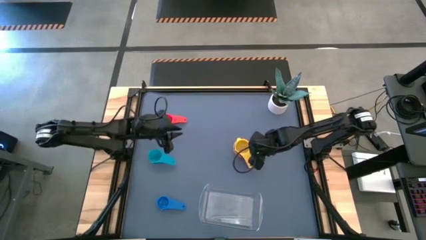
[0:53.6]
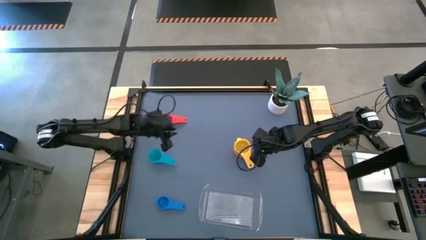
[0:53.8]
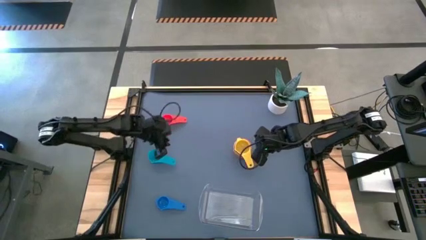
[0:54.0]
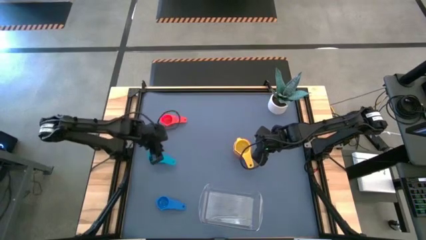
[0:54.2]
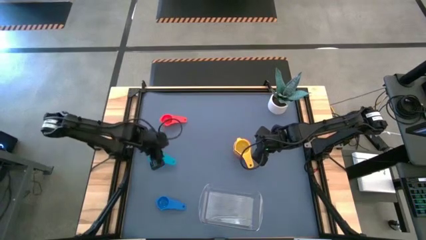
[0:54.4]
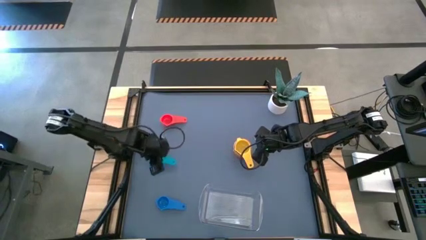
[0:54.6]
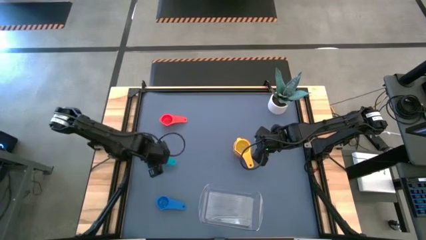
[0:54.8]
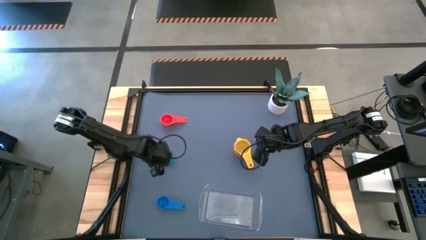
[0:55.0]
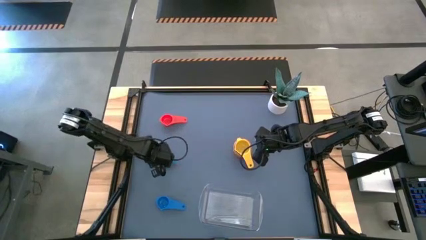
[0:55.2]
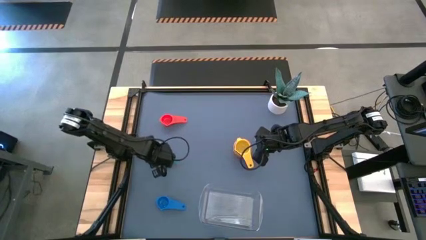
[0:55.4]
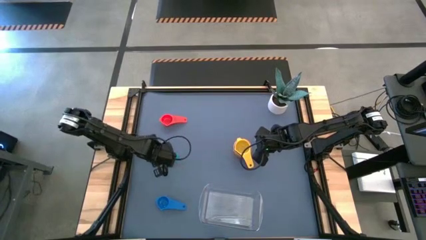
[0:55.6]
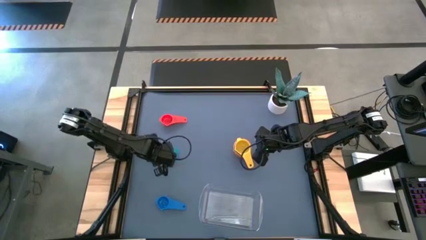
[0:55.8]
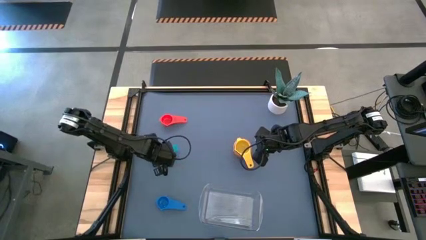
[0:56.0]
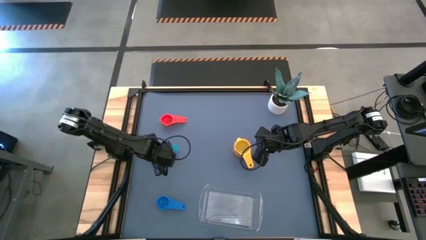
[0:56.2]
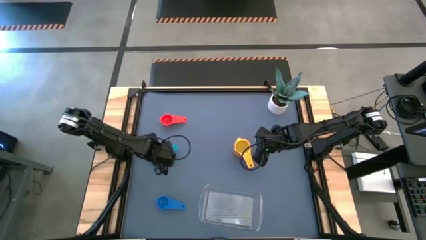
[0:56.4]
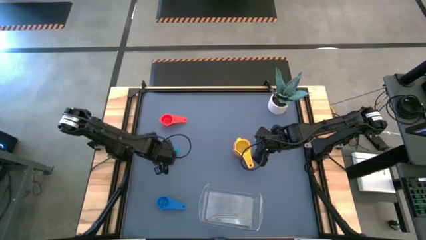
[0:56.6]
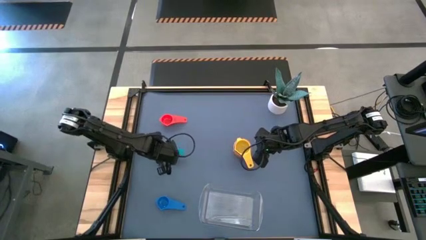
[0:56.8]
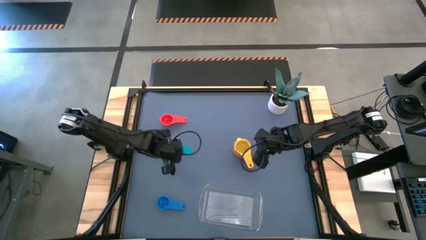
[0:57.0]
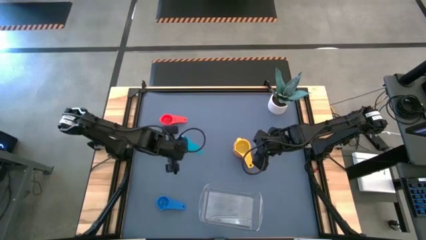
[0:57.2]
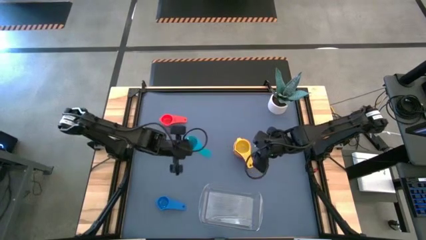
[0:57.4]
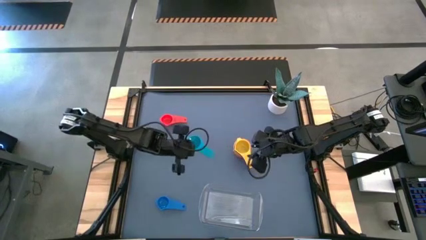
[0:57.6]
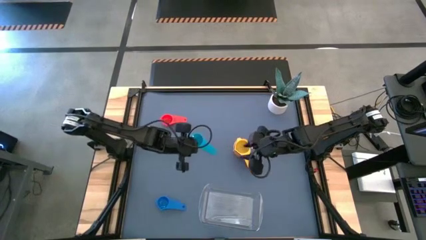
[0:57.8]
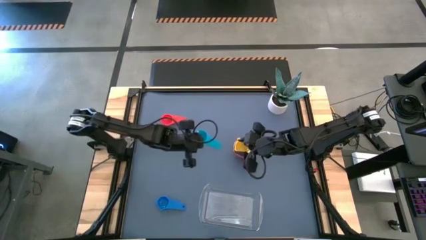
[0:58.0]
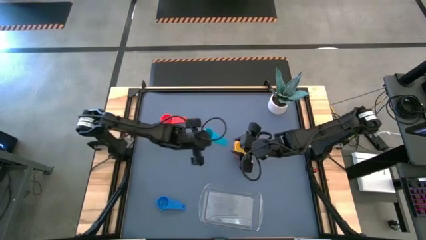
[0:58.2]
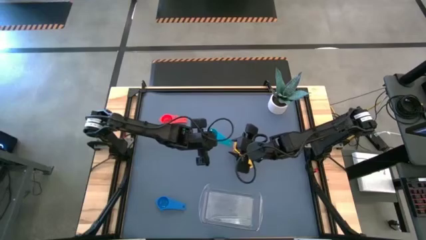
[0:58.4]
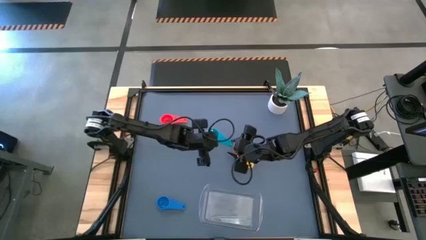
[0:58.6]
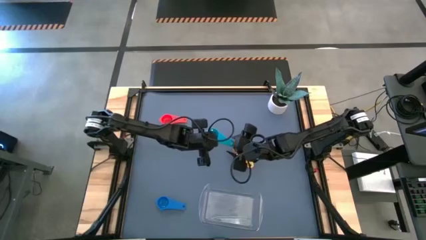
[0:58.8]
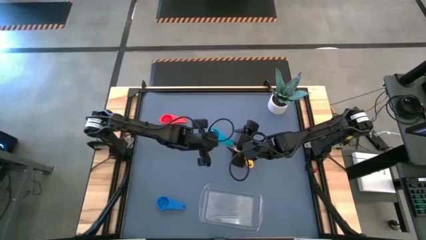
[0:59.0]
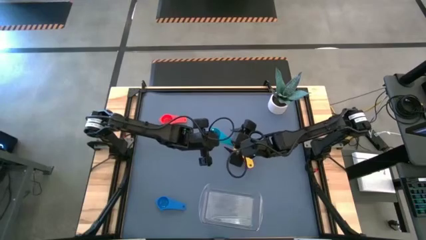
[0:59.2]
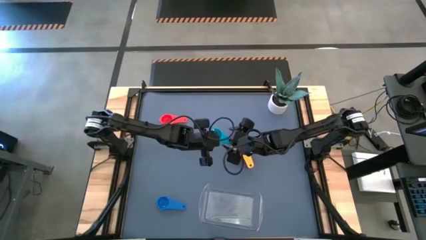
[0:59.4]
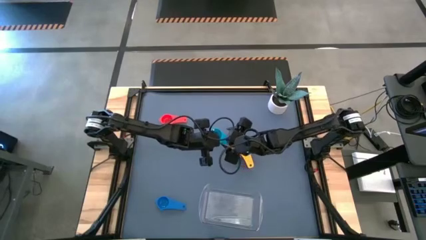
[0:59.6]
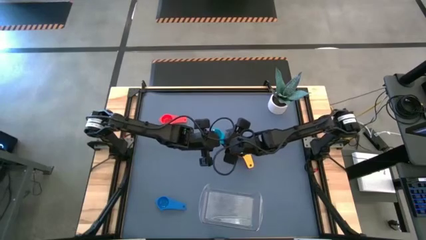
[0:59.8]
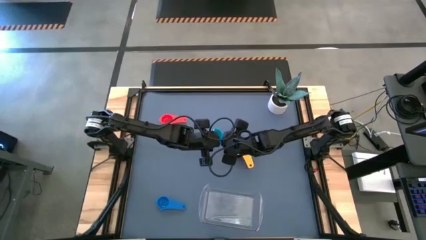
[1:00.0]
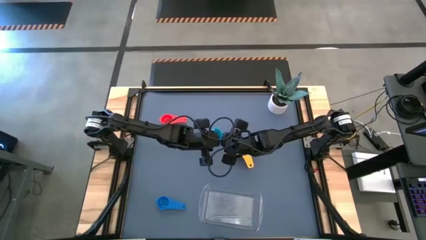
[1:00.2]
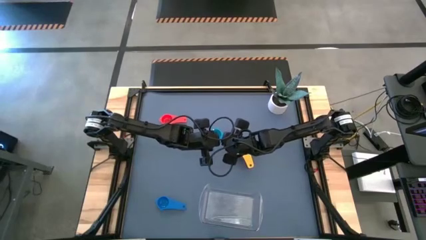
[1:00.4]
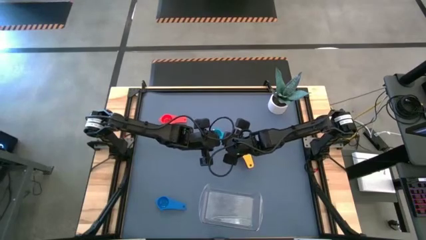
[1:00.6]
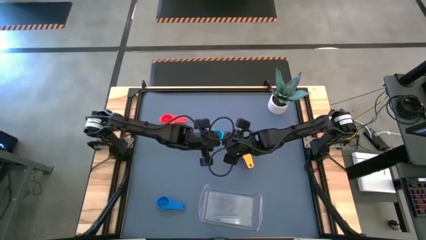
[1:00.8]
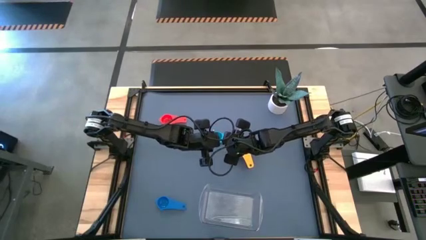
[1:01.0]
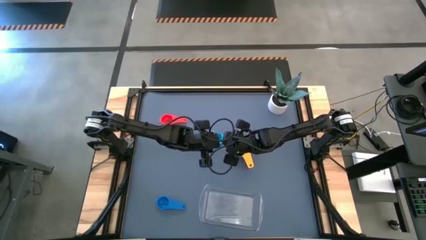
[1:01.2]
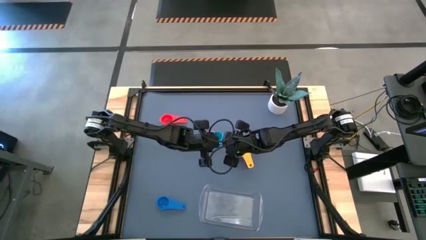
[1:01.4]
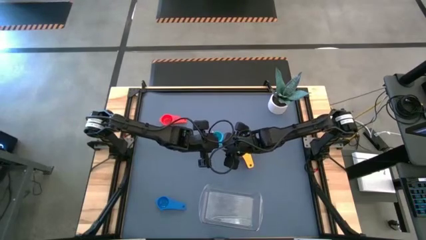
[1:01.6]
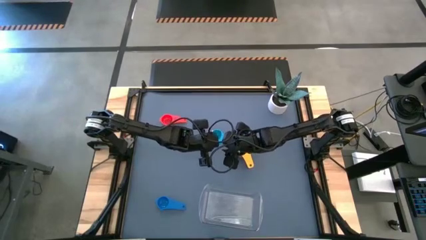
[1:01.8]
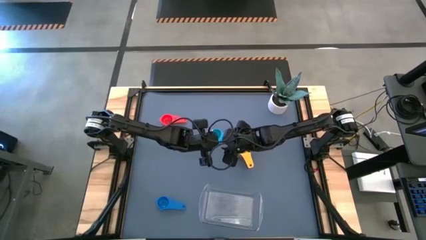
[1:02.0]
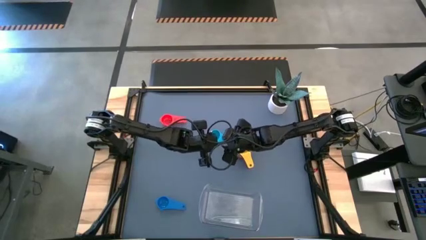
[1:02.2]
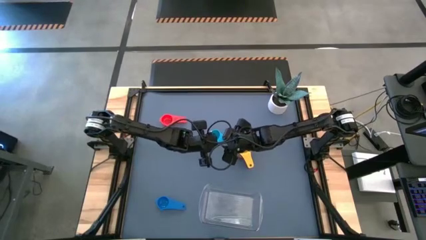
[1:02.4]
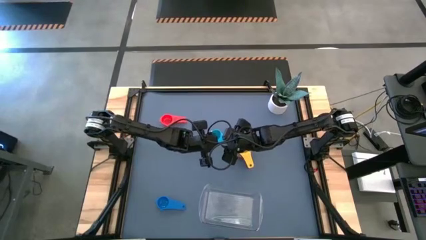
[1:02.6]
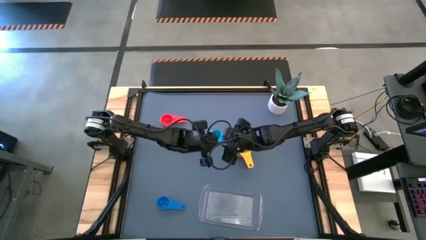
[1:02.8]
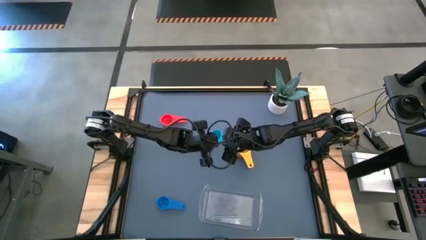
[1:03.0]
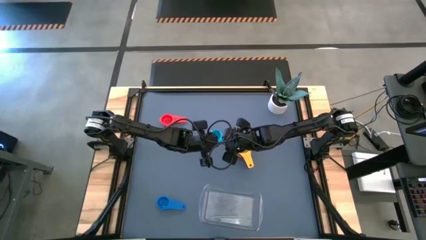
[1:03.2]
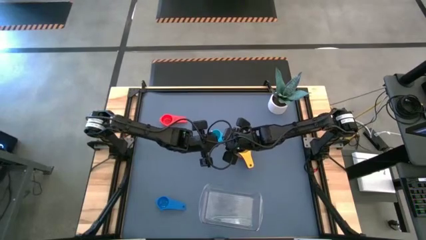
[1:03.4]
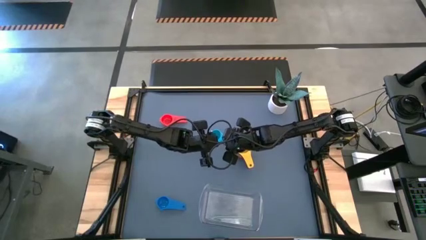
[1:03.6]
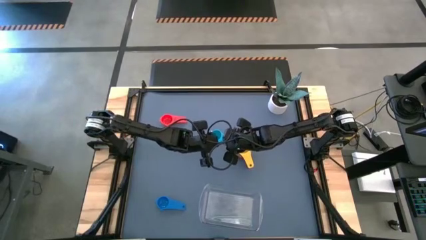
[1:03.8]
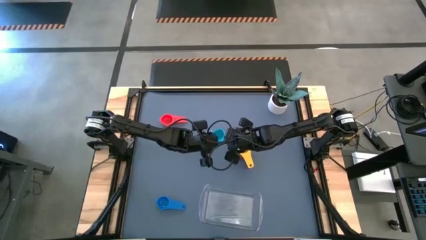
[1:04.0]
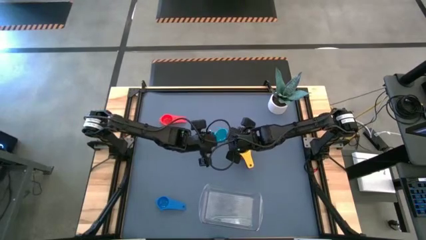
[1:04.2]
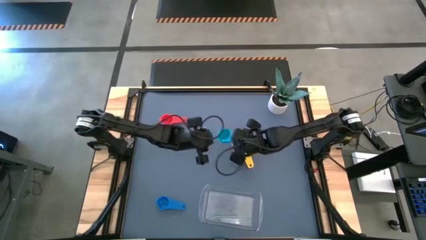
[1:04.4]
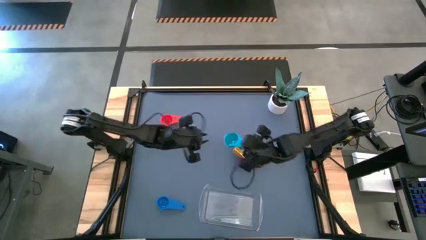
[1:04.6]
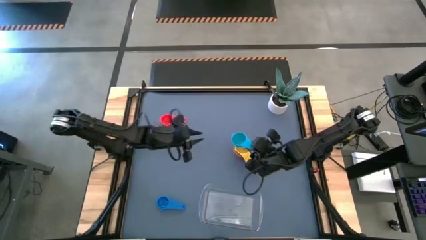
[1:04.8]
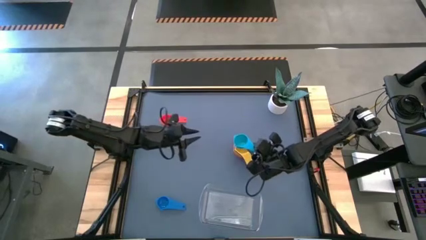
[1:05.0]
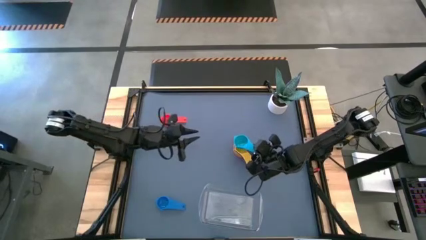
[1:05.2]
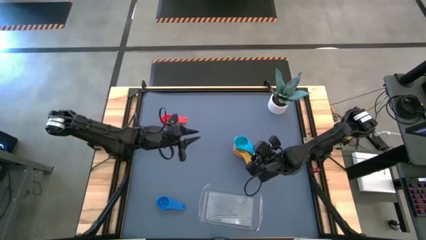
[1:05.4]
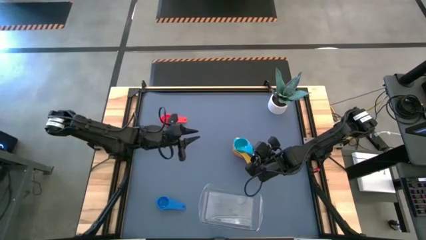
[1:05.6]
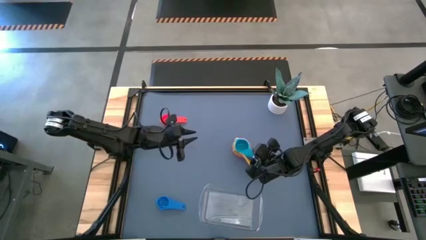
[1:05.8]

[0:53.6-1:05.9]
Task: Nest measuring cups in basket
Stack the light blue measuring cup on top of the yellow measuring cup
